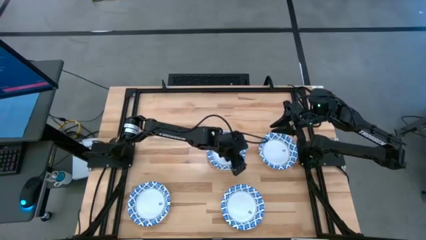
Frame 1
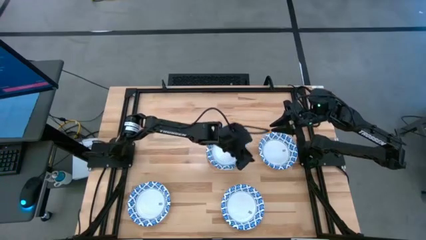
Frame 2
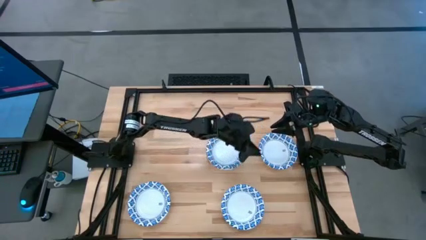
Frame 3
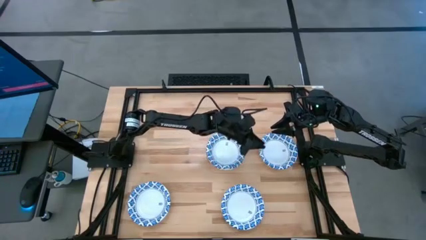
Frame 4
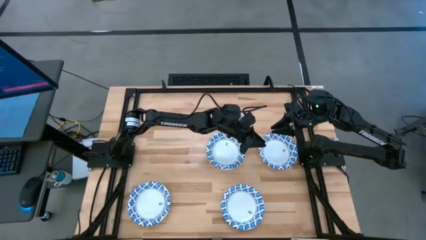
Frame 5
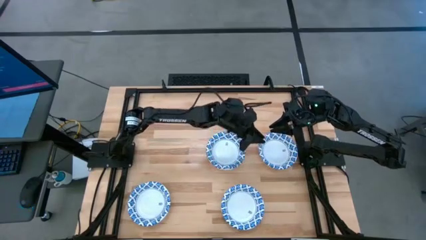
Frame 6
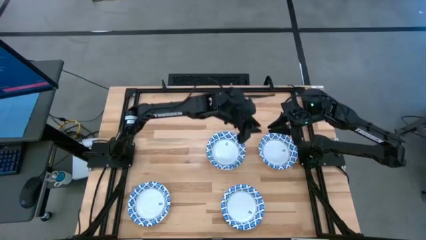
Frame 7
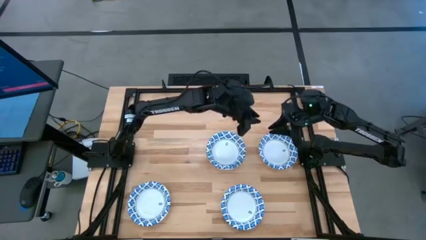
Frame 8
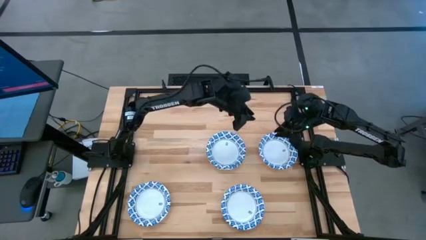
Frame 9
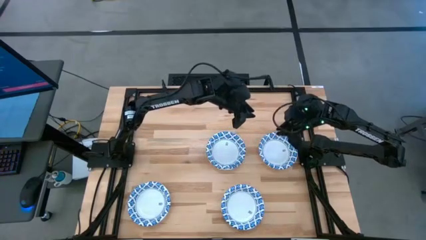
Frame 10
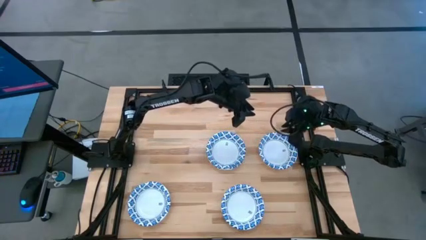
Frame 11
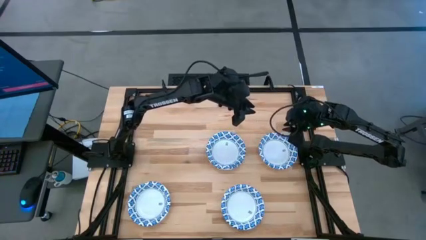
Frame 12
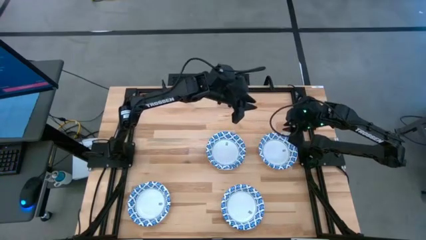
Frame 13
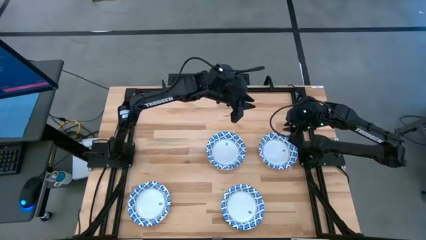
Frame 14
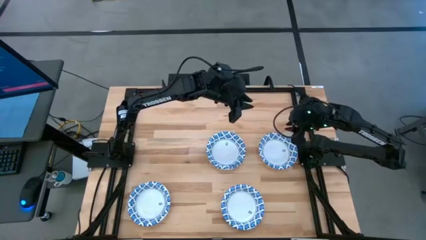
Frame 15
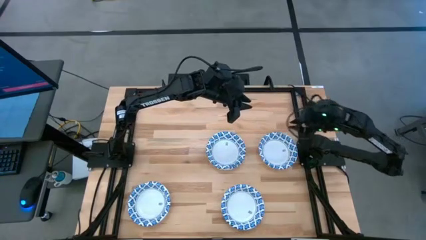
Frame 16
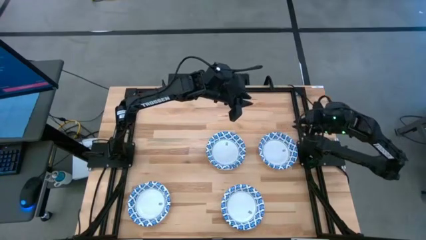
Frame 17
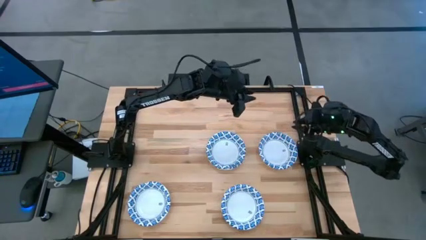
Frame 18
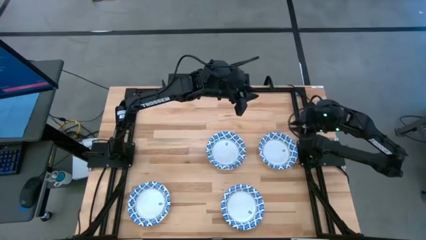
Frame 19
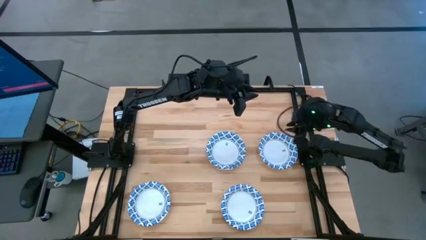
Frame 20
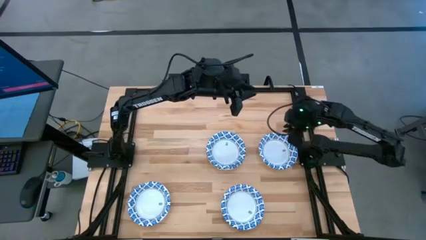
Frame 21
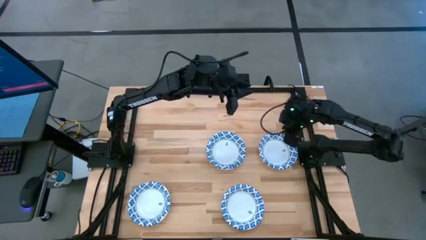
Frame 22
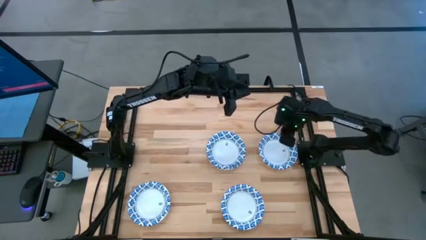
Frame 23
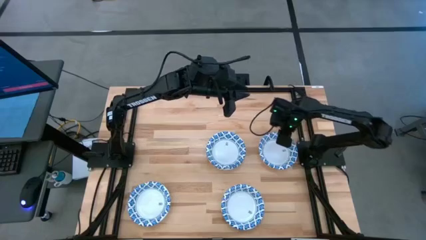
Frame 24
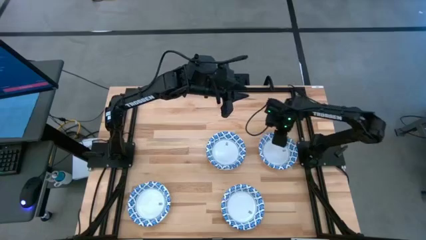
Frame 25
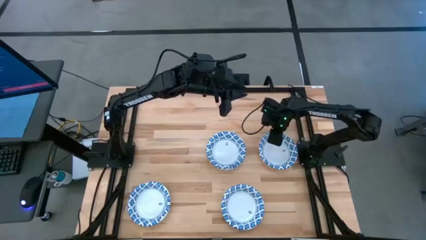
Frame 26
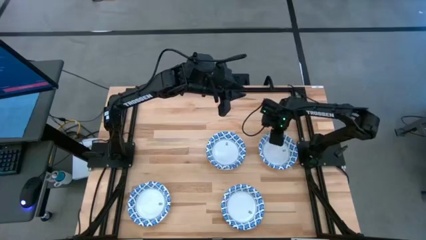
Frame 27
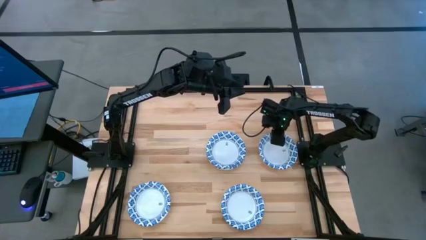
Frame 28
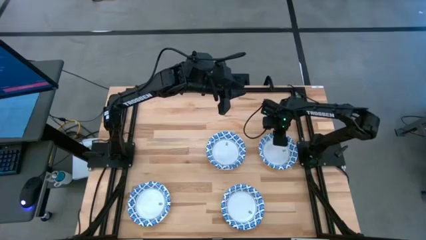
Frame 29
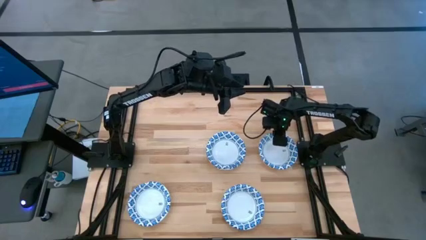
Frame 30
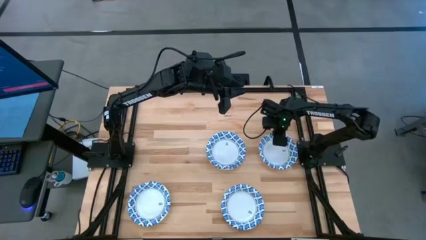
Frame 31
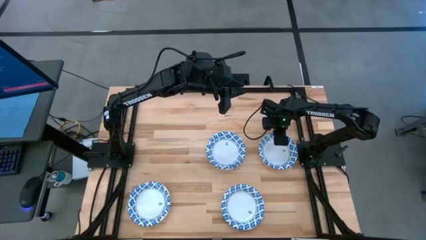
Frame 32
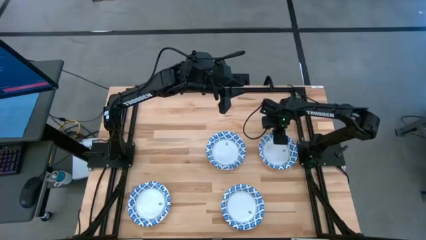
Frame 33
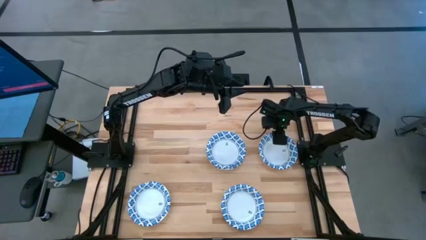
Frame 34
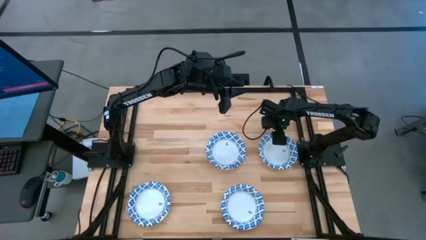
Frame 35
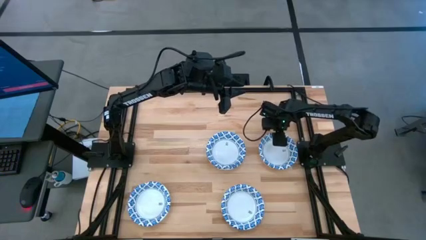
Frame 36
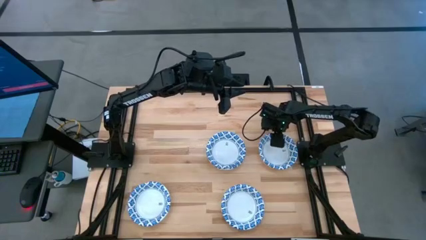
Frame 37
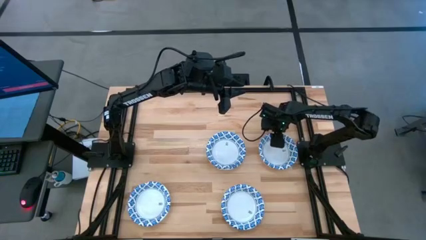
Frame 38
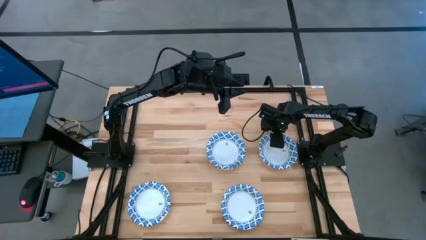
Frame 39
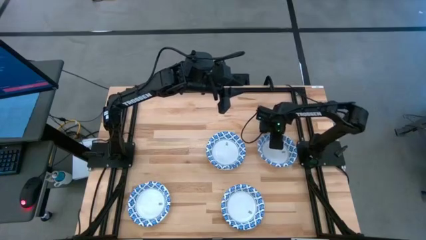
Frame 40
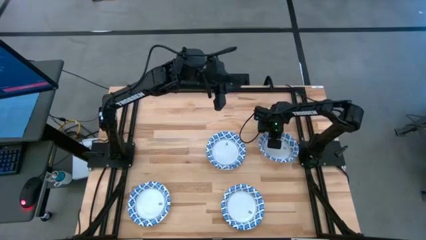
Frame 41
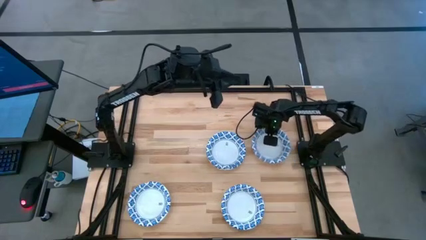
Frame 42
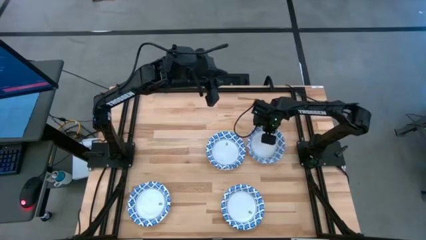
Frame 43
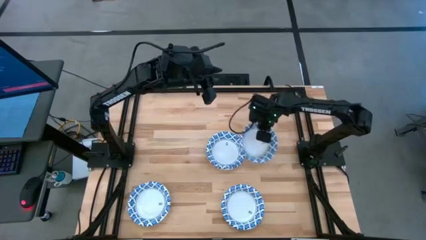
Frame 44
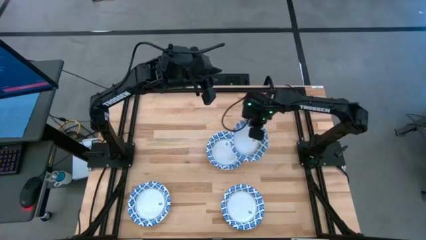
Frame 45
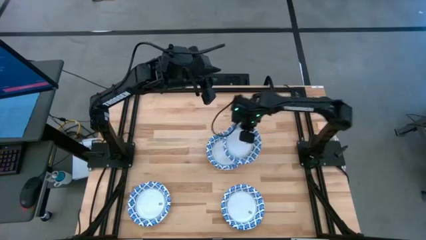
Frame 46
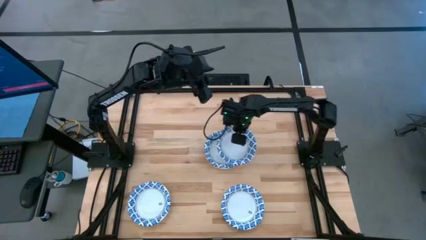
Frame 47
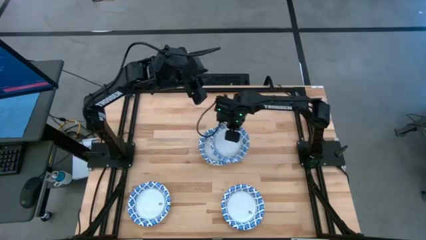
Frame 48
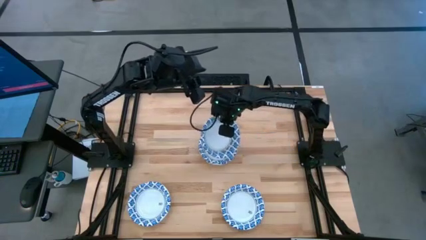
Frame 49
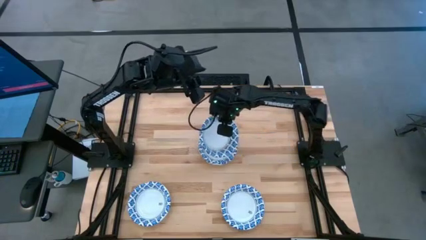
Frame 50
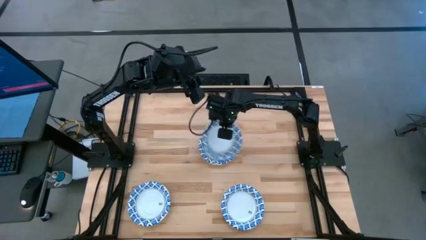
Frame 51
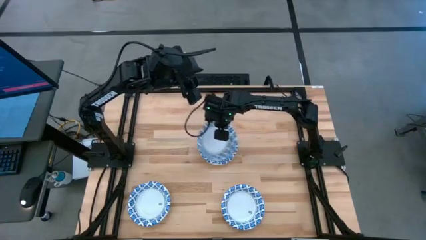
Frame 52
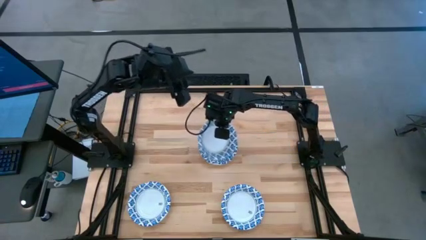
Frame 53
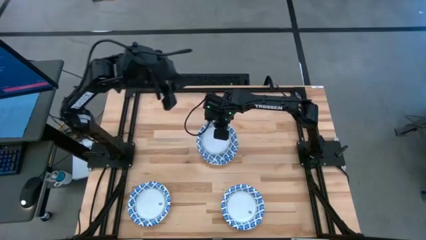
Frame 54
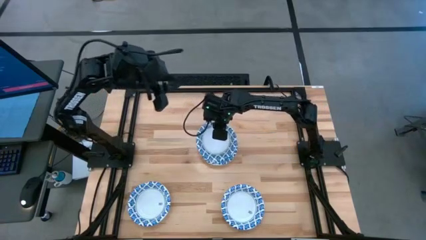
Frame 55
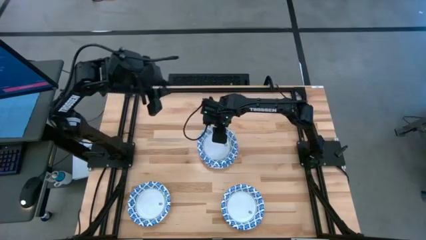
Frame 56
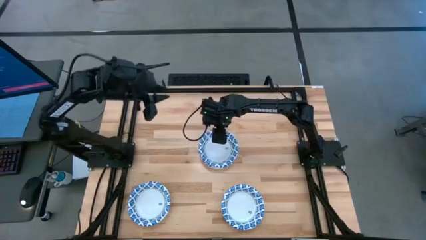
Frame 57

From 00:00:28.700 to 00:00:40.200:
Task: Nest bowls inside each other
Stack the white bowl on top of the other white bowl

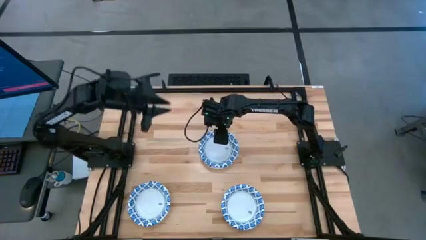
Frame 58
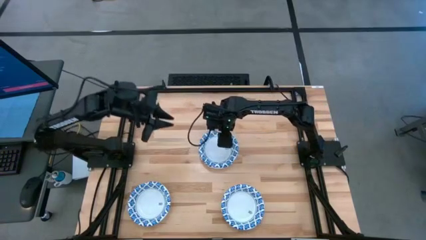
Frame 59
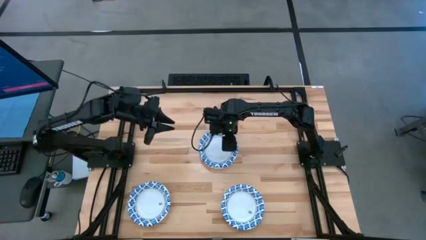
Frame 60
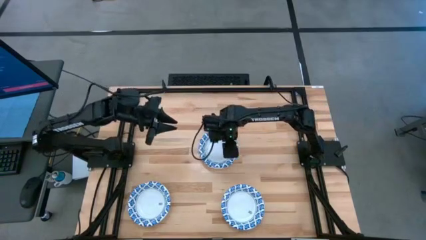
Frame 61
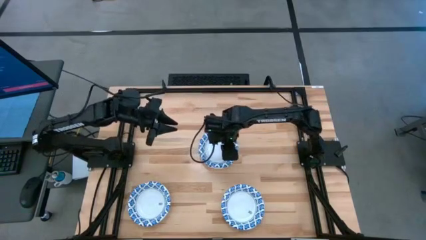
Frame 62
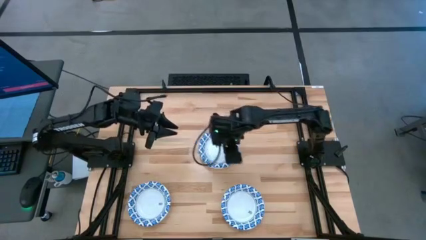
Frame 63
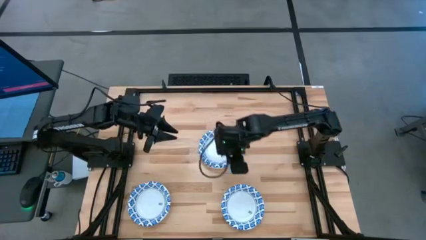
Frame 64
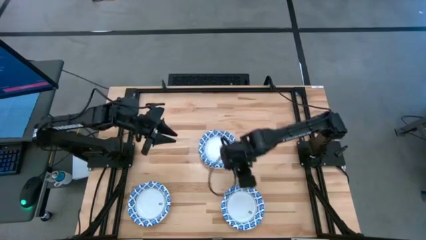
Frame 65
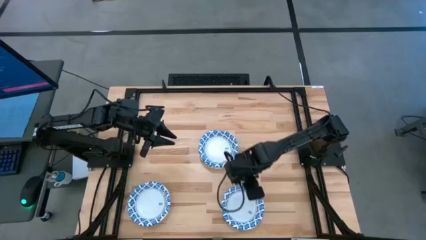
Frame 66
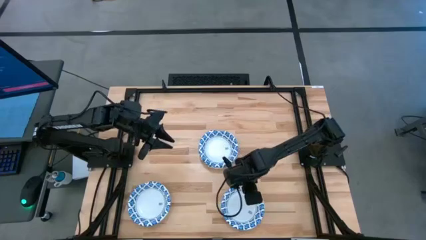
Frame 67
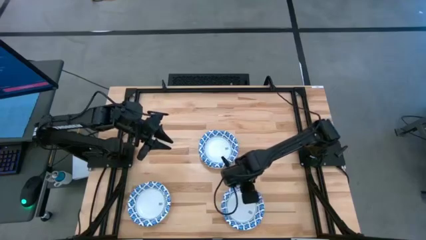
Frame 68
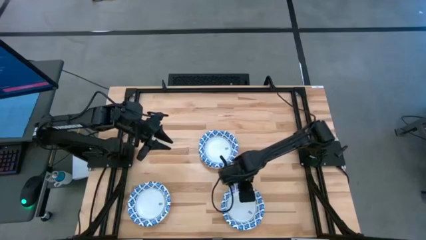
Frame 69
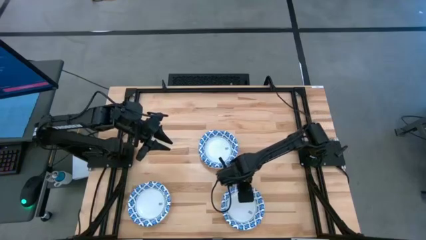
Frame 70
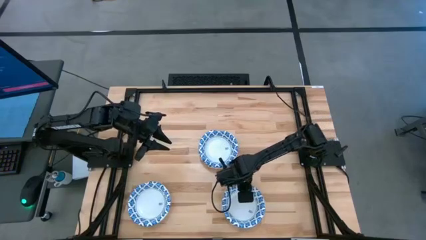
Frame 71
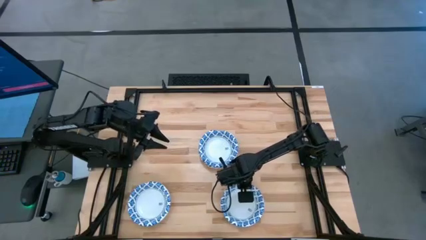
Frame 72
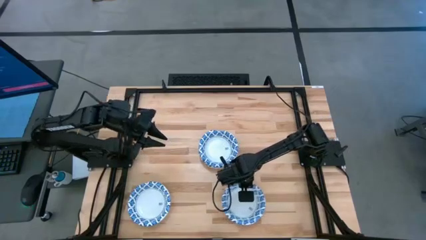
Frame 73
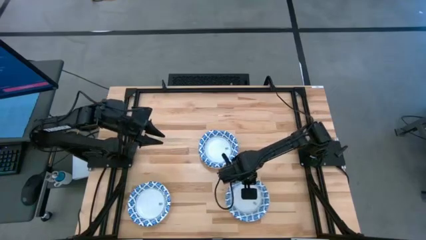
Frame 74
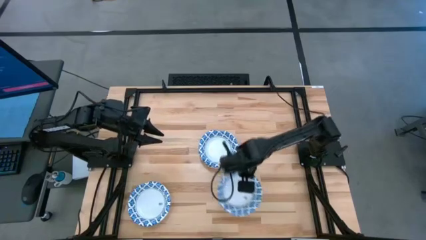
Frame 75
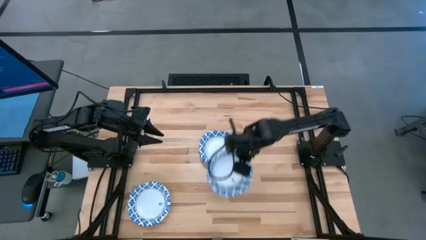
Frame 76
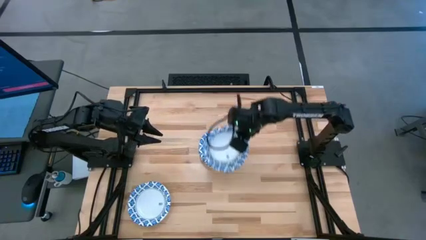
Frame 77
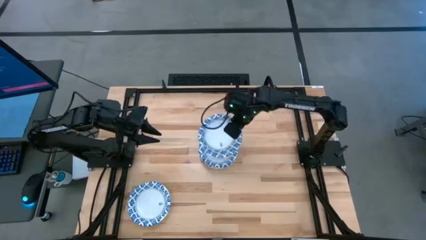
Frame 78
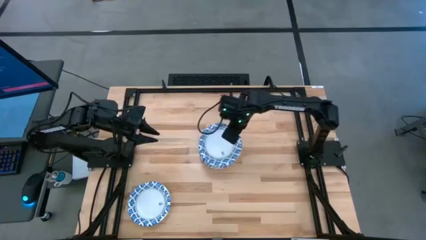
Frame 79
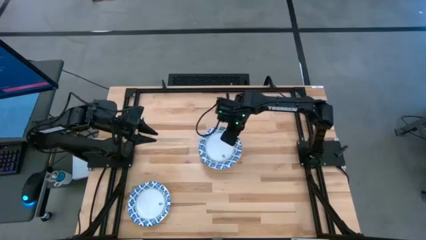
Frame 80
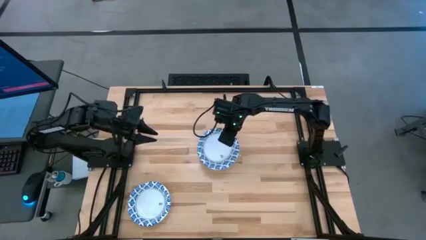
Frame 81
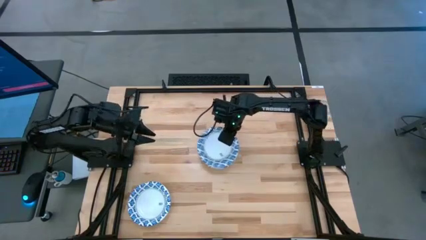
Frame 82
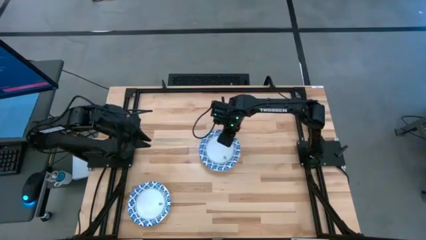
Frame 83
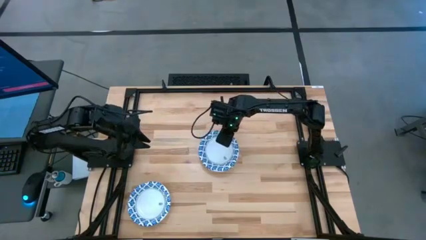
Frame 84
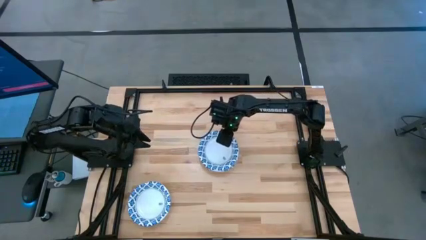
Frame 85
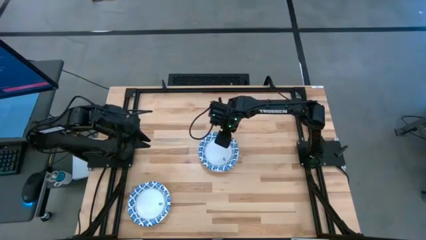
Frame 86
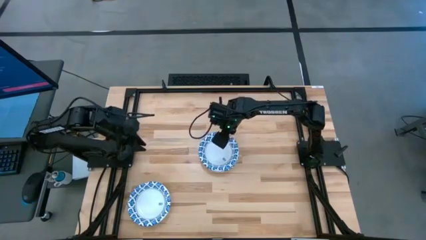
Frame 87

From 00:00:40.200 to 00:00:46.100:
Stack the white bowl on top of the other white bowl
